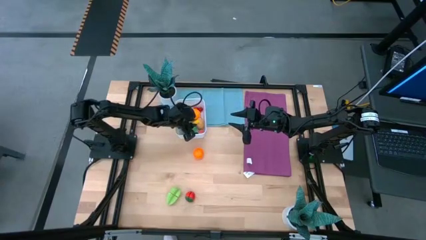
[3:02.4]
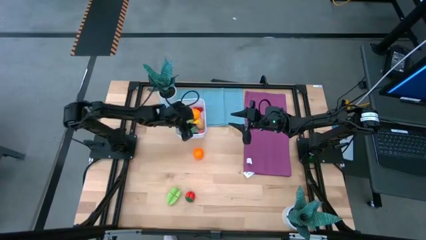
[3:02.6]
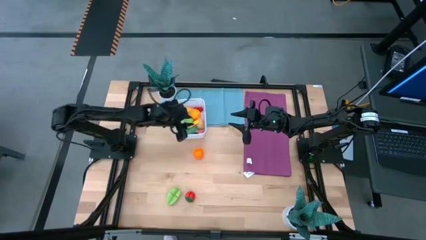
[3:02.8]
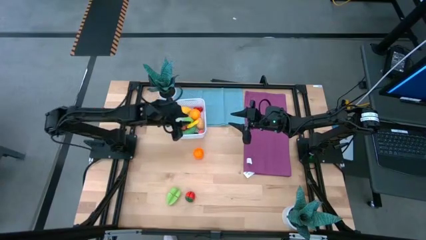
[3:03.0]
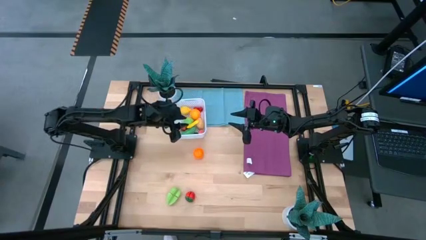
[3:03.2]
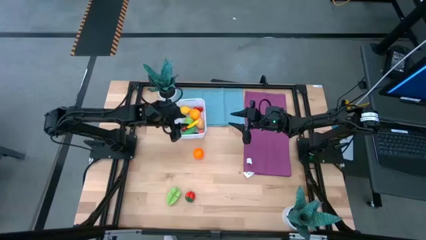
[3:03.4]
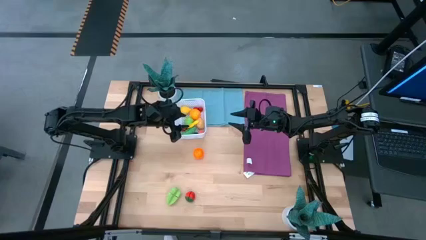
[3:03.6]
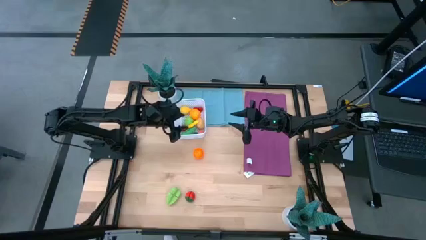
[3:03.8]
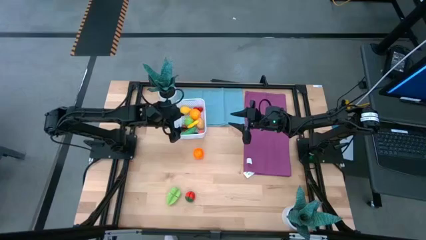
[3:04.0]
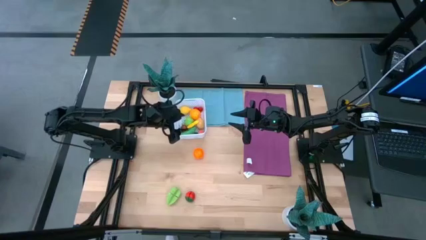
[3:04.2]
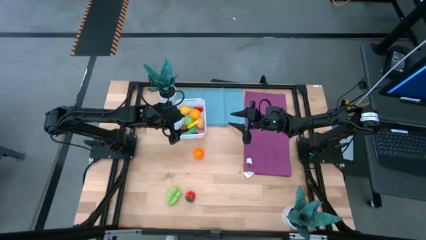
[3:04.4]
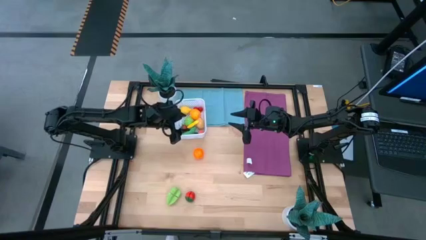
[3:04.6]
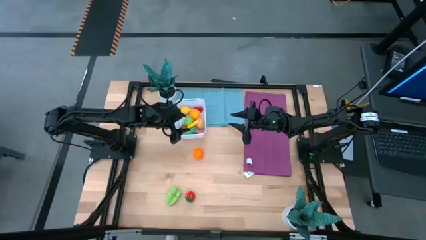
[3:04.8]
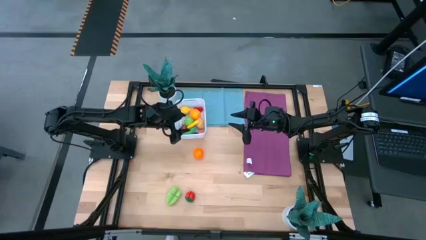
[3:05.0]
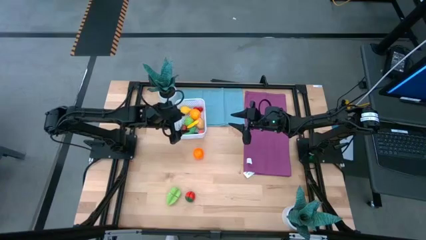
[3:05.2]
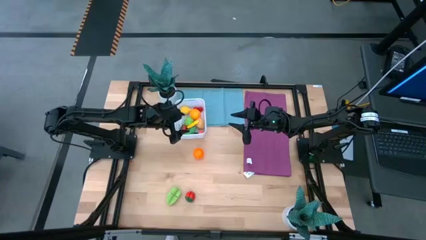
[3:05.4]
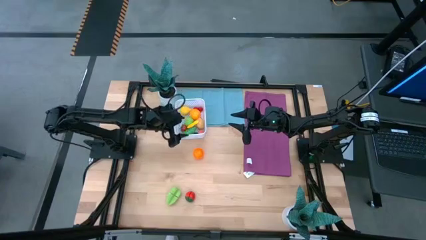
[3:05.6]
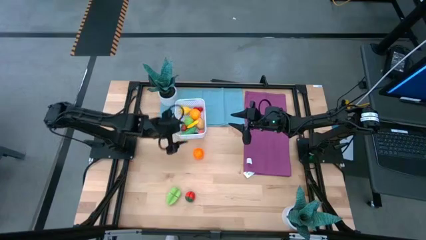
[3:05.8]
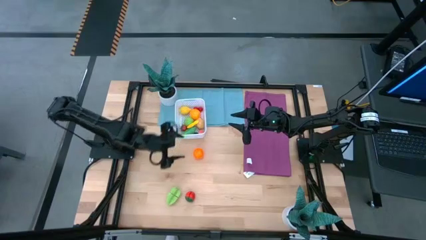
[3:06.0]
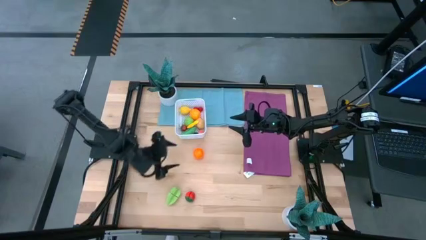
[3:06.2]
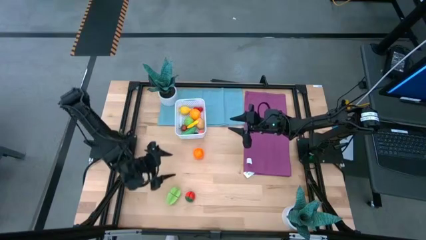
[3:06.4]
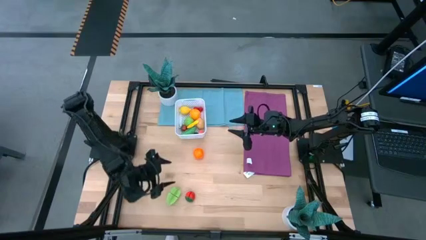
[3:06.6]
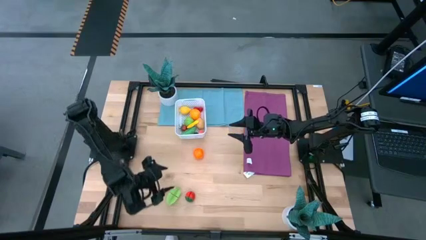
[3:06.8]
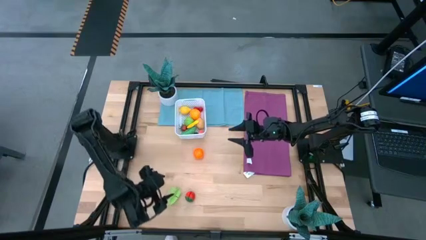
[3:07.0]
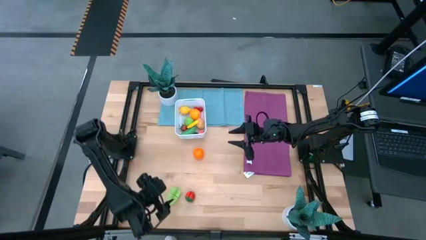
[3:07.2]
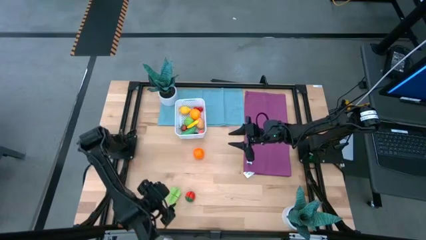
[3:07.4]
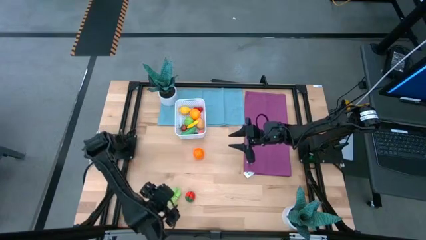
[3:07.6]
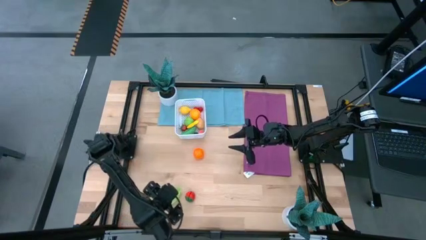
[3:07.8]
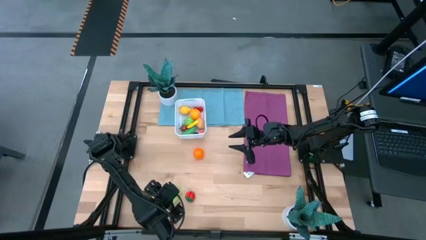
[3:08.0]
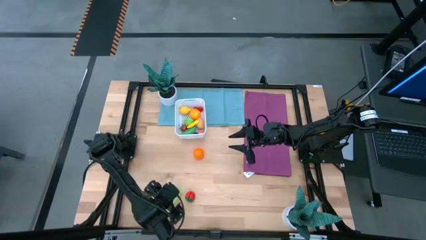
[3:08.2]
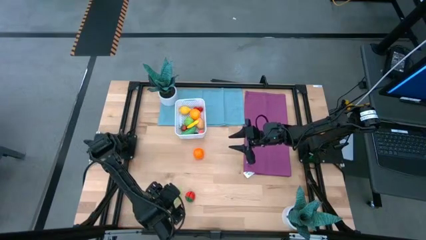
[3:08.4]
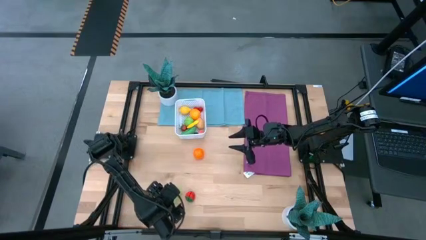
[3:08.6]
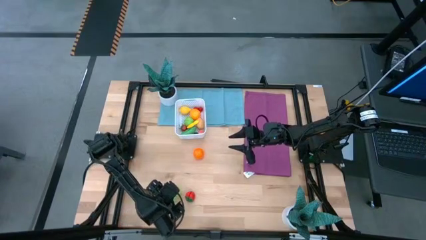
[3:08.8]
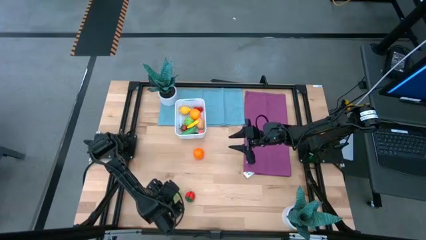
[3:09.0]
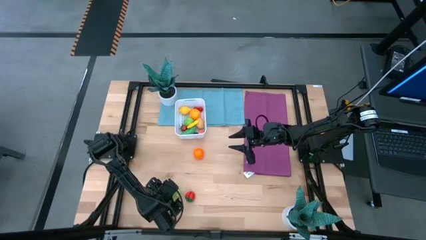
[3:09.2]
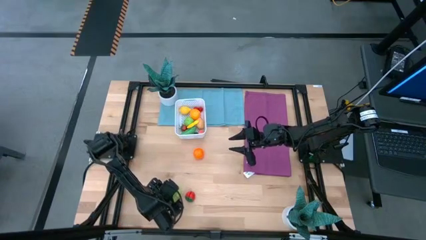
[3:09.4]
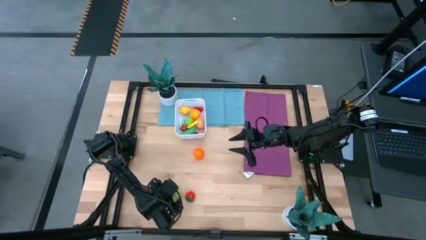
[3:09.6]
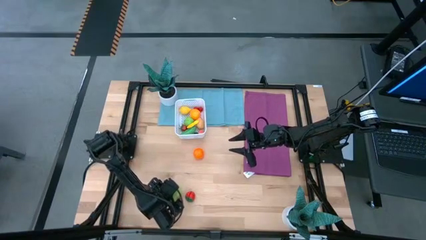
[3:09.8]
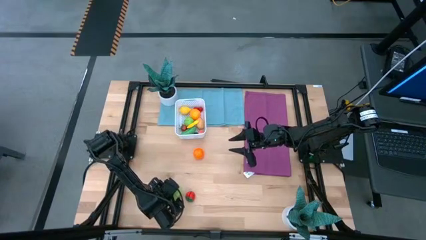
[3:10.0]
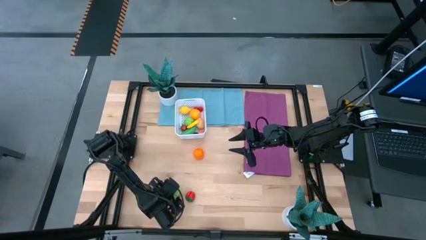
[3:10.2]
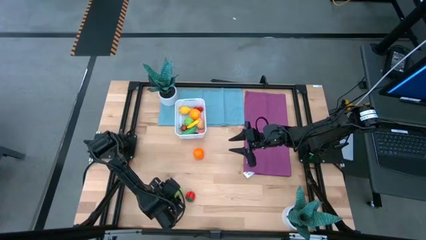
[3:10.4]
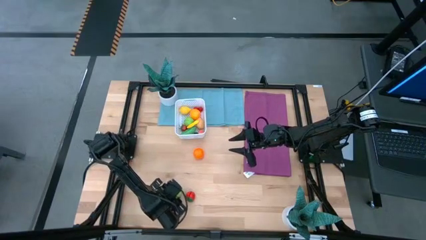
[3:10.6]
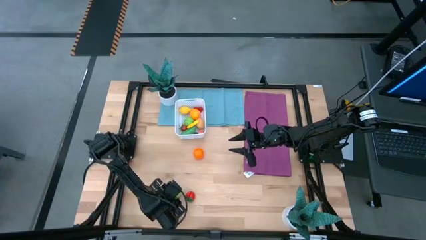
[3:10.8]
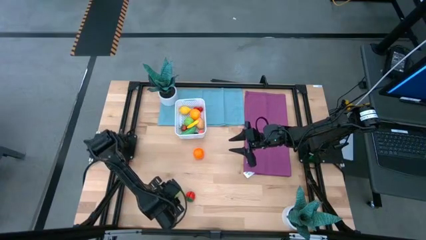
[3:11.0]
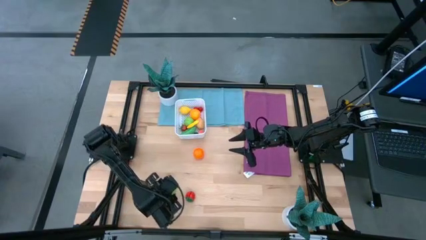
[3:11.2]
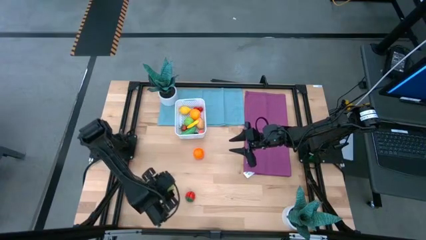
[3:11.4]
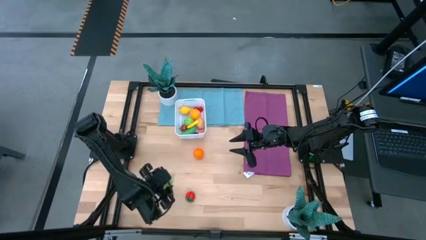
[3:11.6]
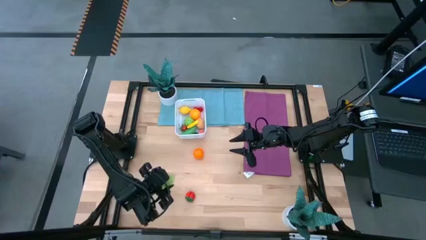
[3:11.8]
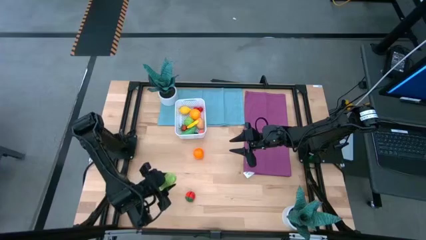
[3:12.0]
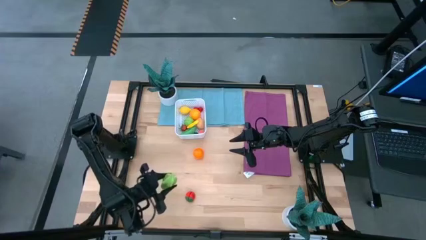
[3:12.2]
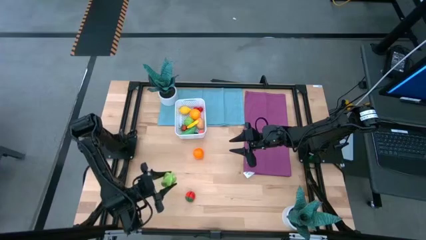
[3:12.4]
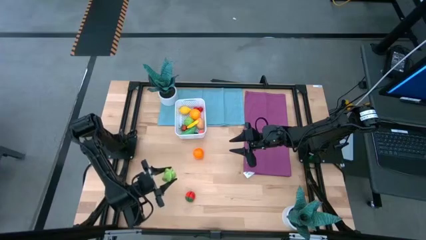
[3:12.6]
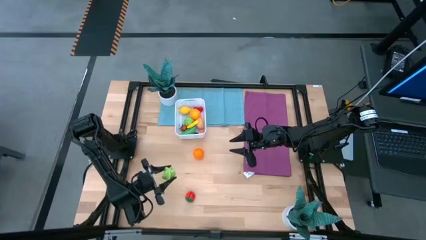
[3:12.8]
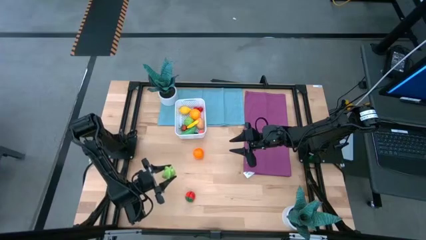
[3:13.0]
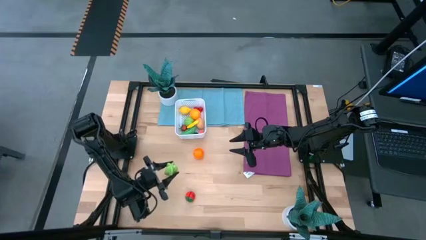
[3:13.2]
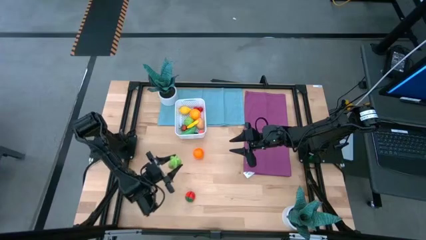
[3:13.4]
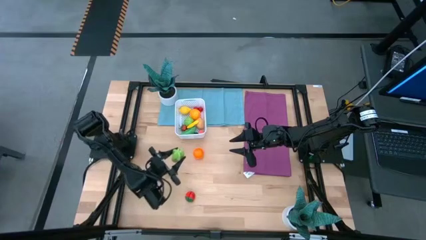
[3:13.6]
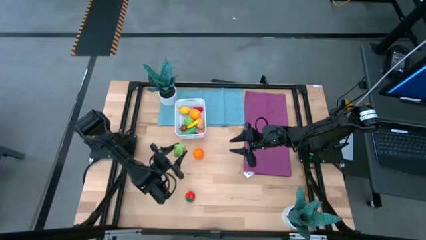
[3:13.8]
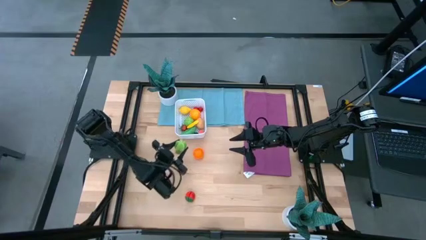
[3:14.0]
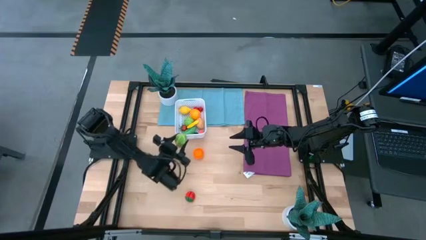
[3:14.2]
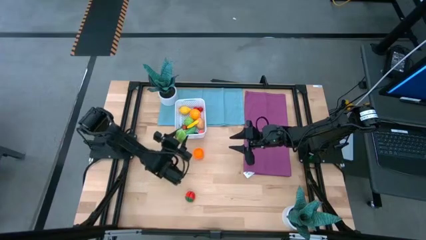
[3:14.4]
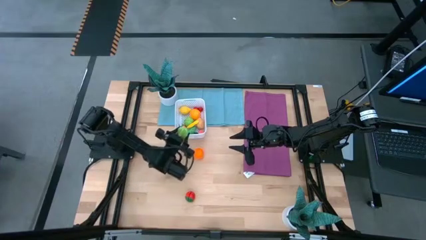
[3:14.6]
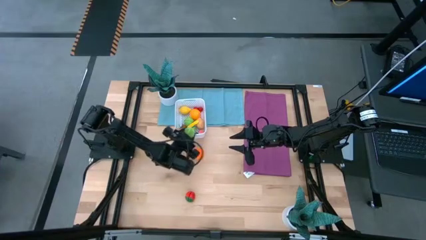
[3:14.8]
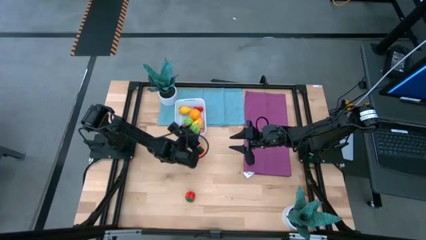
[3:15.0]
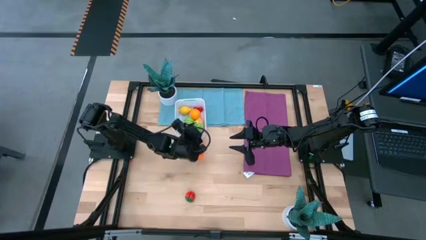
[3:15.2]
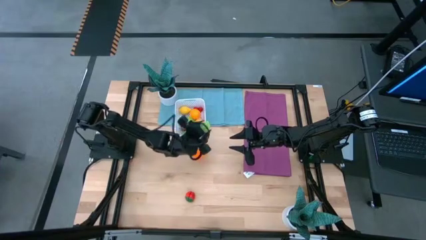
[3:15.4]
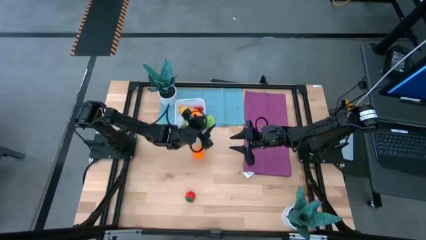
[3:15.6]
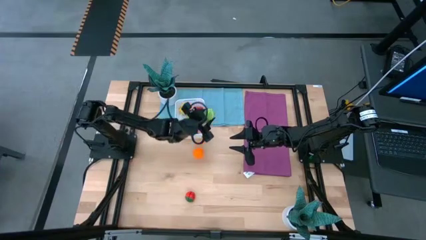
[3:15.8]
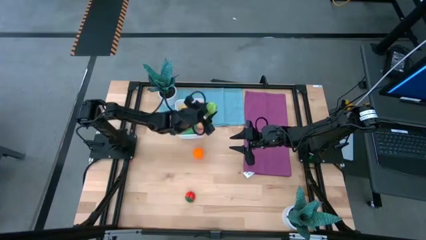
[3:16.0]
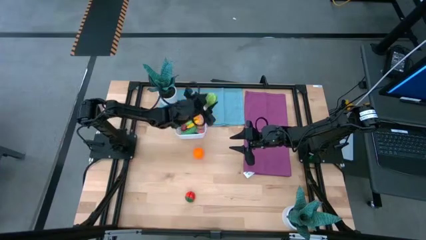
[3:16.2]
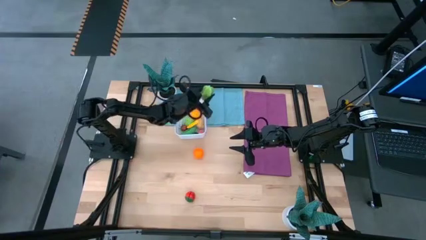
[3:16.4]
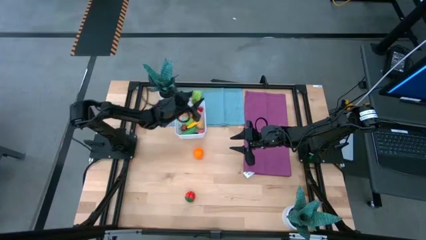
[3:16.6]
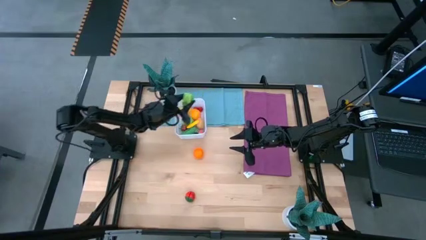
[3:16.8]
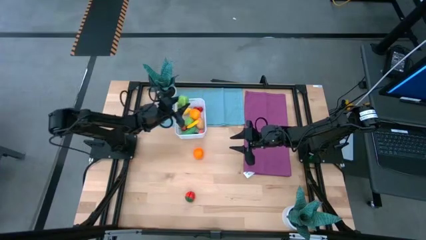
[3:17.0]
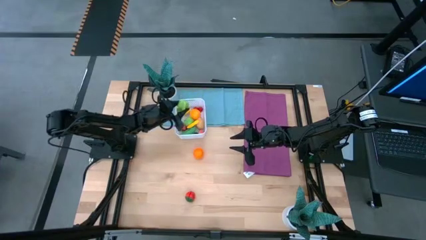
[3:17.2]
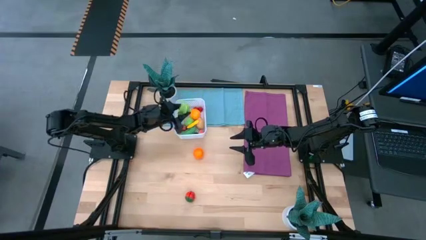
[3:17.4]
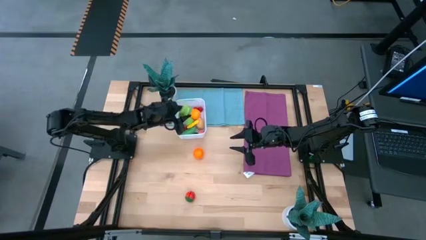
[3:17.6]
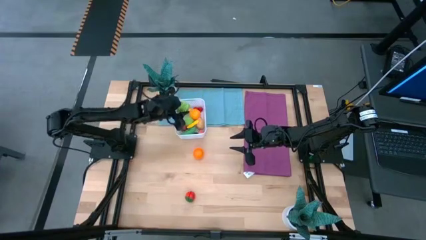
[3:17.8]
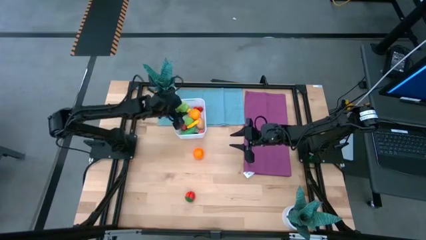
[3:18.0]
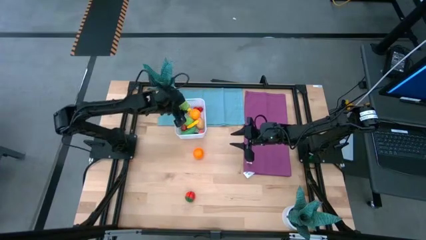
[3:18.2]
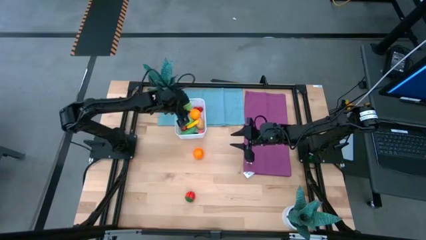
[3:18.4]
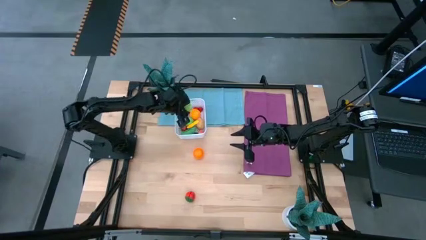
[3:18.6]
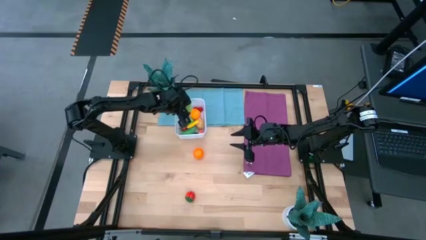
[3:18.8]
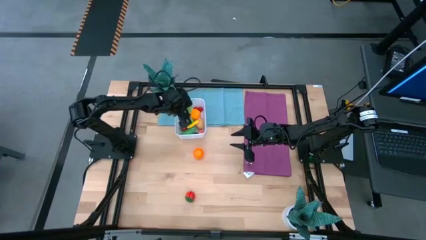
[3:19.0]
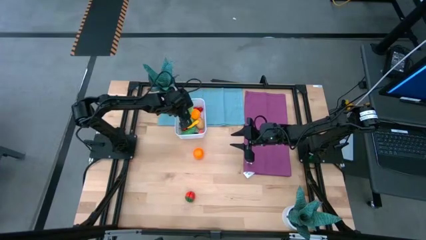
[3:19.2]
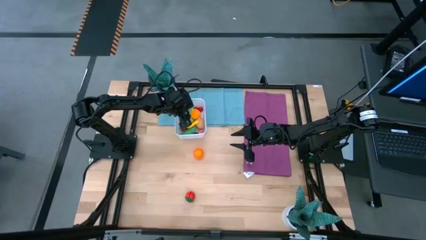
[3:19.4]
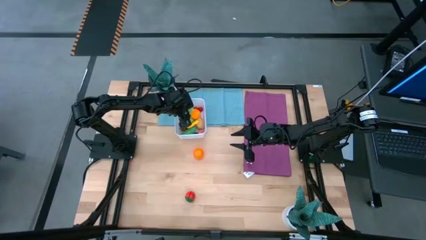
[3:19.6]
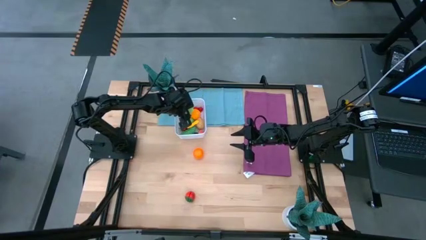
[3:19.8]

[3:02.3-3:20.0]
Task: Pick and placing Produce into tupperware
Put the green starfruit into the white basket
